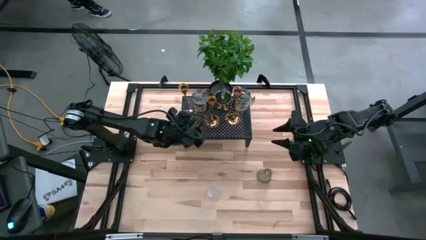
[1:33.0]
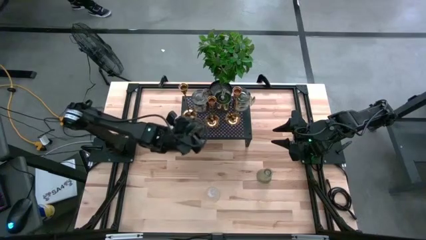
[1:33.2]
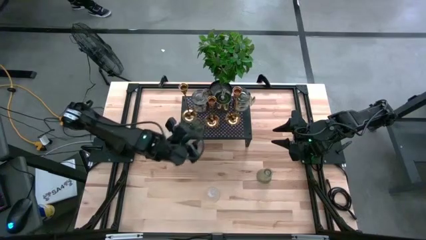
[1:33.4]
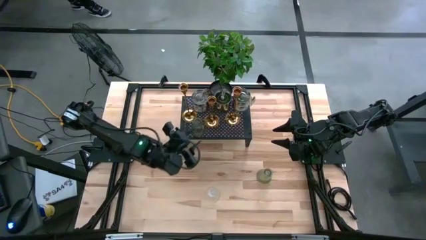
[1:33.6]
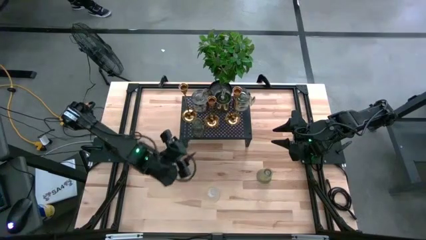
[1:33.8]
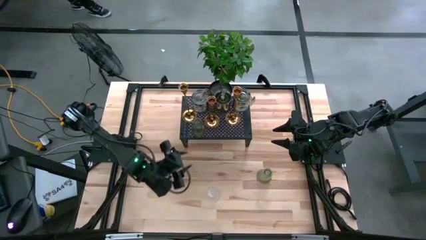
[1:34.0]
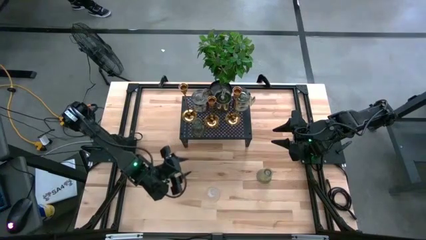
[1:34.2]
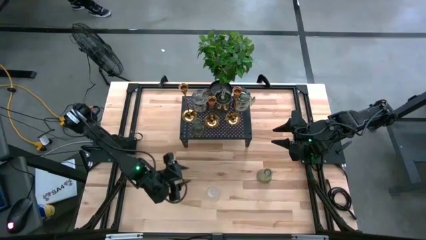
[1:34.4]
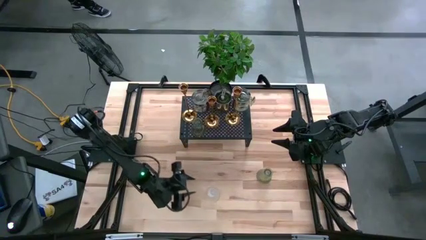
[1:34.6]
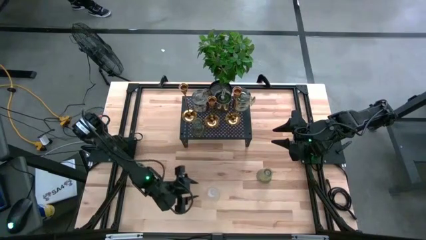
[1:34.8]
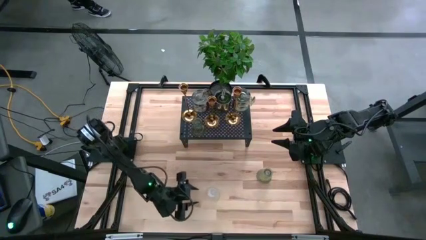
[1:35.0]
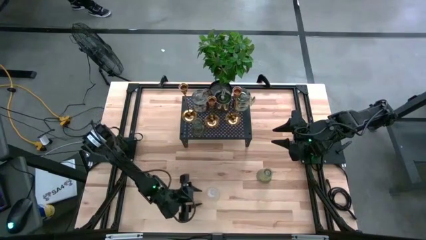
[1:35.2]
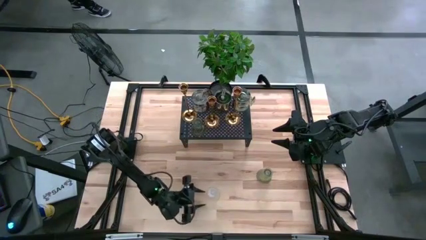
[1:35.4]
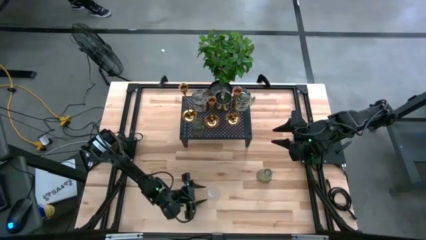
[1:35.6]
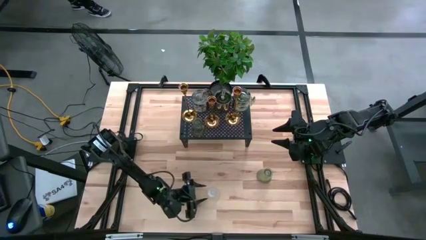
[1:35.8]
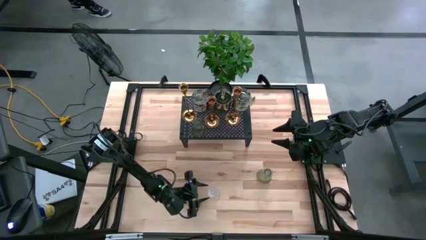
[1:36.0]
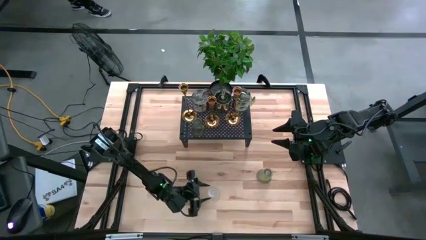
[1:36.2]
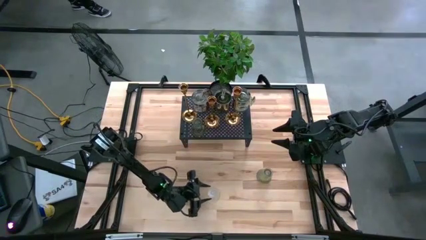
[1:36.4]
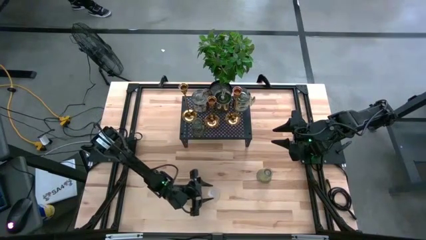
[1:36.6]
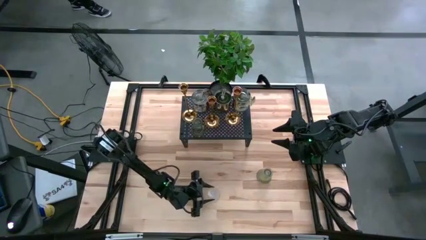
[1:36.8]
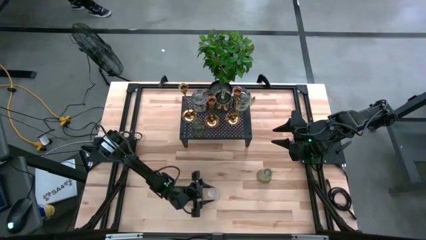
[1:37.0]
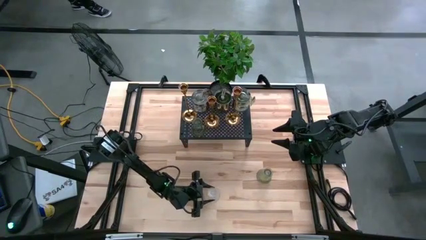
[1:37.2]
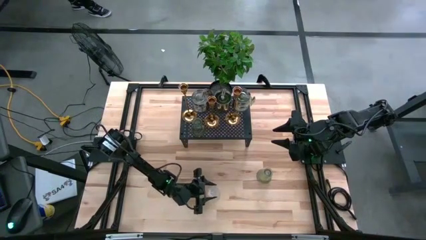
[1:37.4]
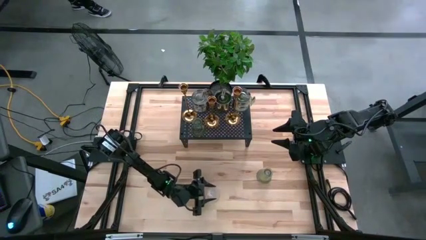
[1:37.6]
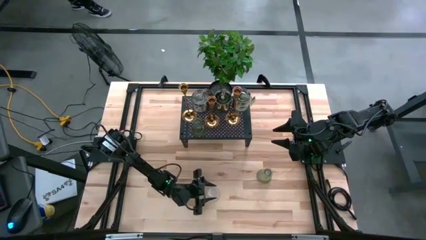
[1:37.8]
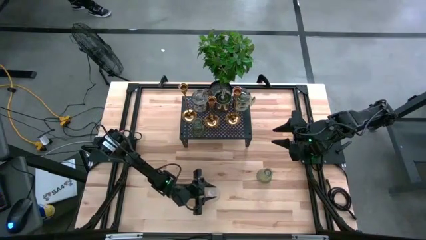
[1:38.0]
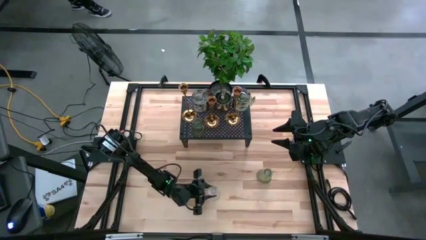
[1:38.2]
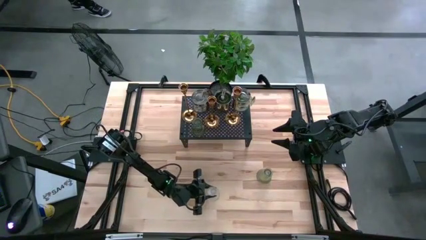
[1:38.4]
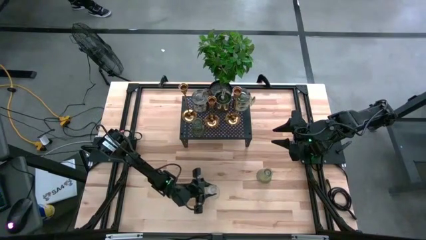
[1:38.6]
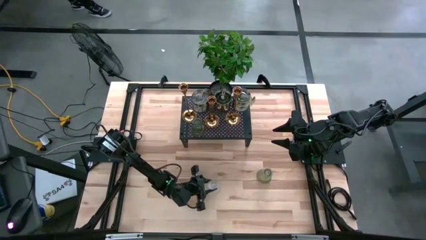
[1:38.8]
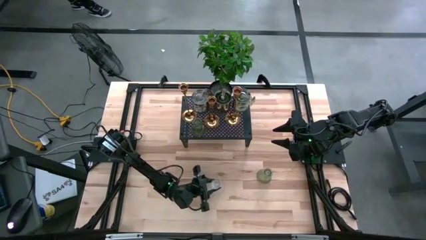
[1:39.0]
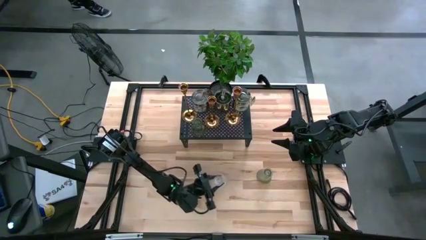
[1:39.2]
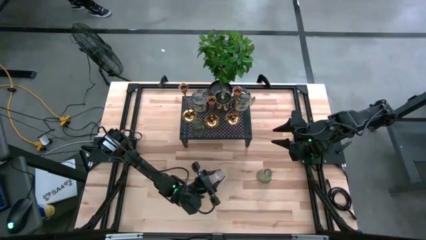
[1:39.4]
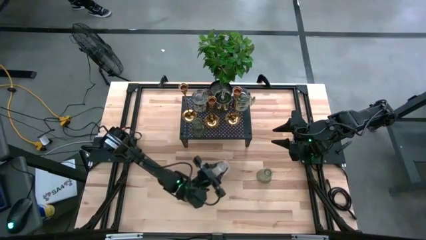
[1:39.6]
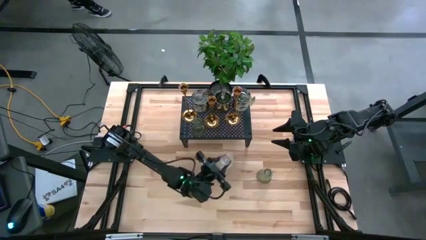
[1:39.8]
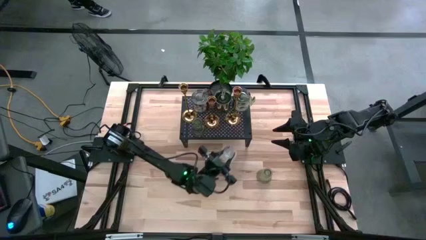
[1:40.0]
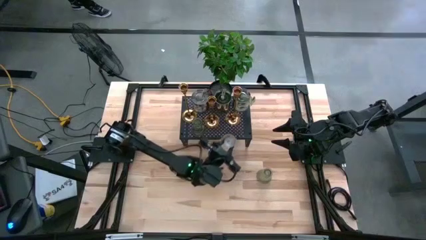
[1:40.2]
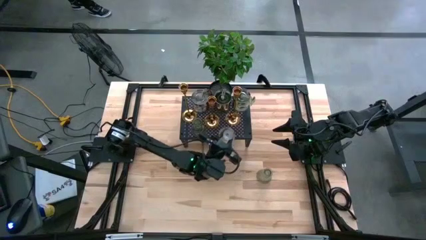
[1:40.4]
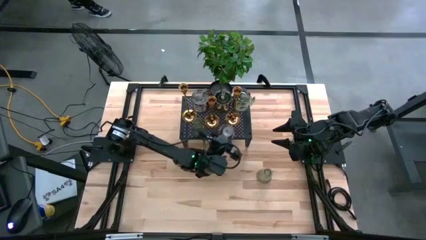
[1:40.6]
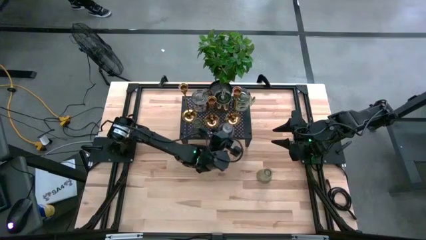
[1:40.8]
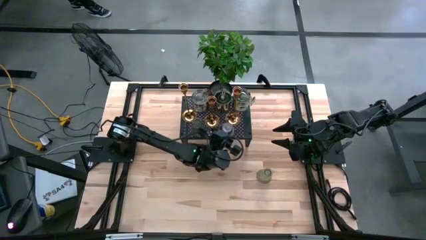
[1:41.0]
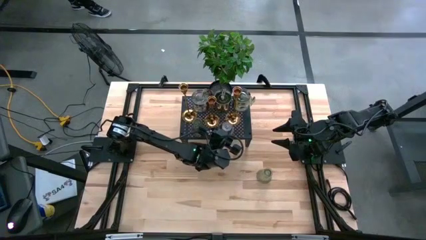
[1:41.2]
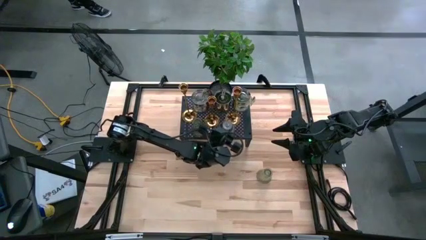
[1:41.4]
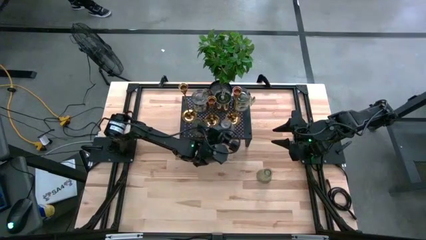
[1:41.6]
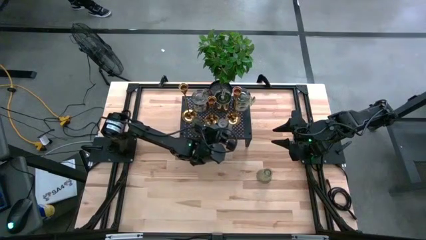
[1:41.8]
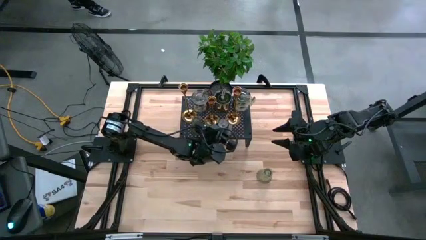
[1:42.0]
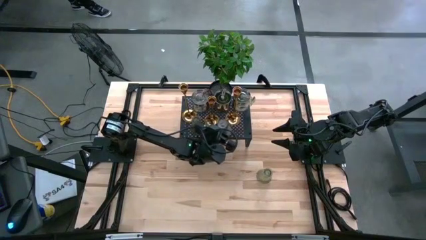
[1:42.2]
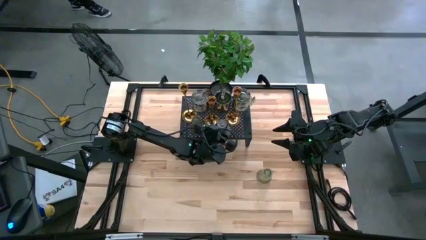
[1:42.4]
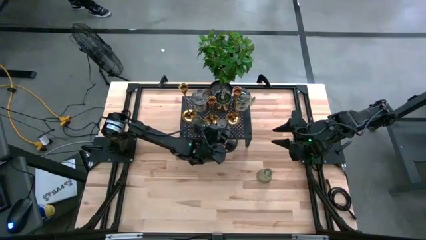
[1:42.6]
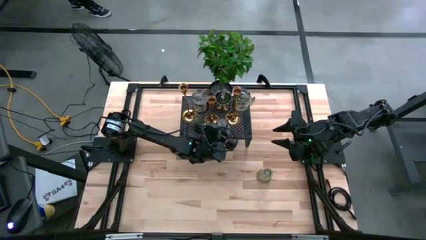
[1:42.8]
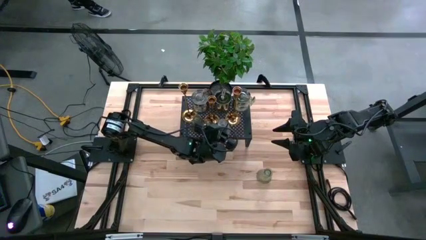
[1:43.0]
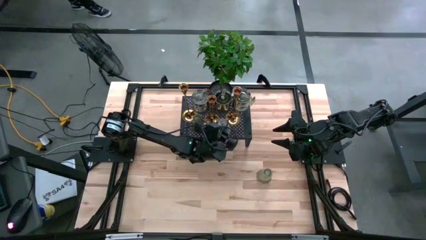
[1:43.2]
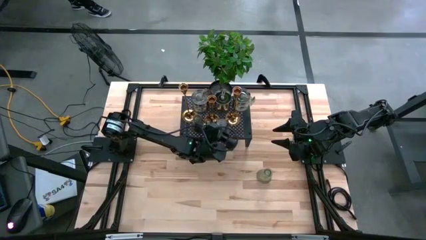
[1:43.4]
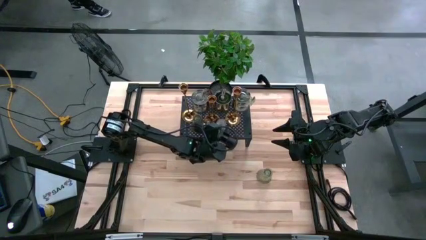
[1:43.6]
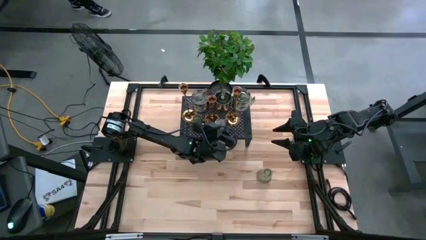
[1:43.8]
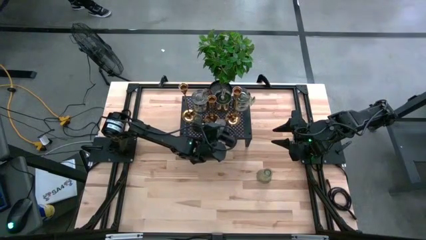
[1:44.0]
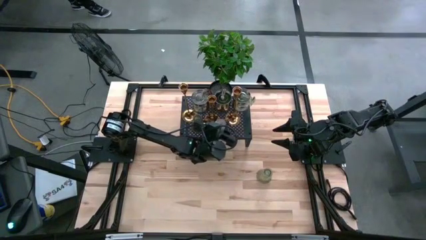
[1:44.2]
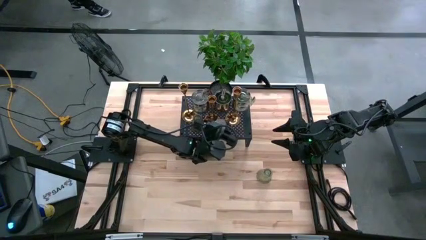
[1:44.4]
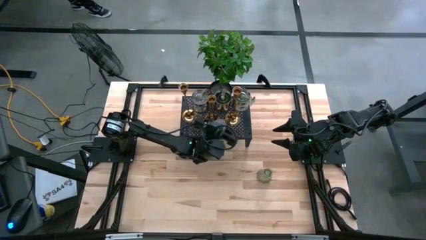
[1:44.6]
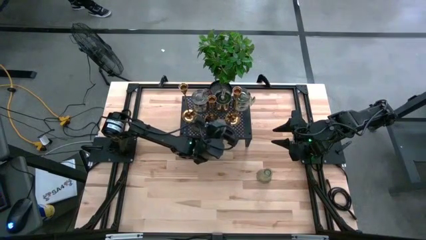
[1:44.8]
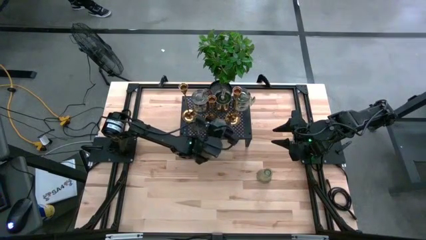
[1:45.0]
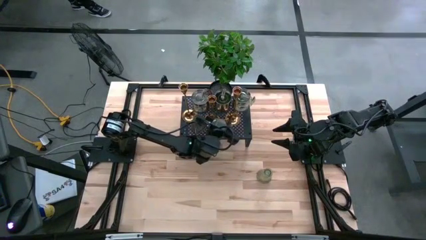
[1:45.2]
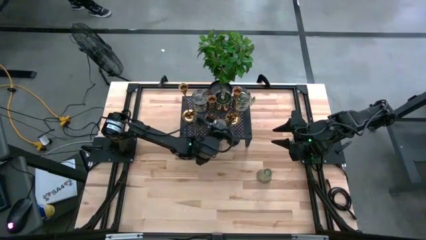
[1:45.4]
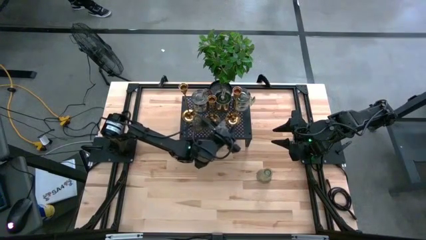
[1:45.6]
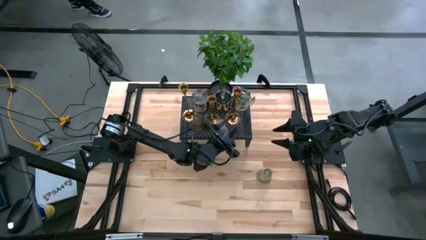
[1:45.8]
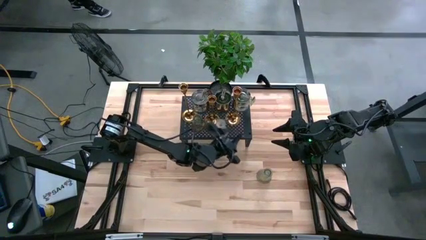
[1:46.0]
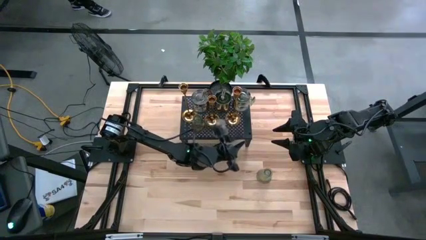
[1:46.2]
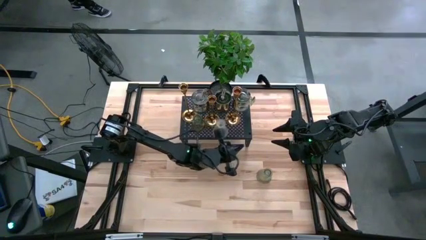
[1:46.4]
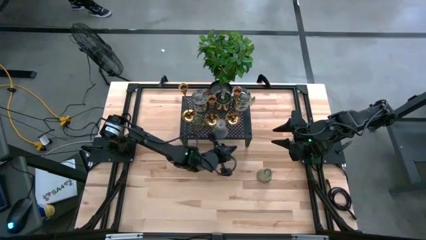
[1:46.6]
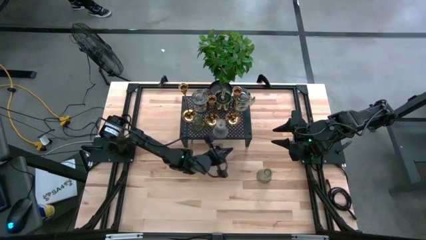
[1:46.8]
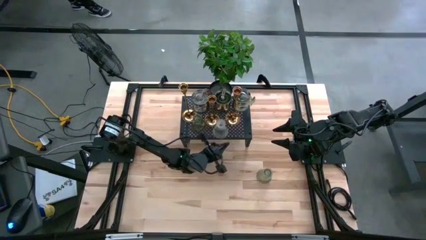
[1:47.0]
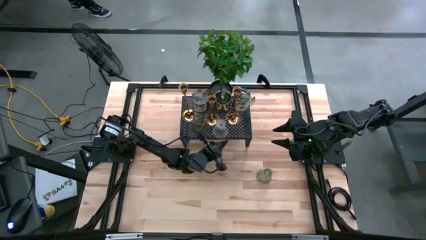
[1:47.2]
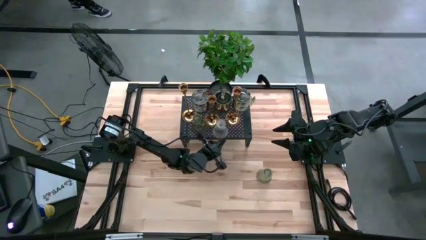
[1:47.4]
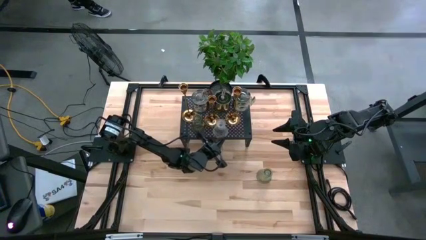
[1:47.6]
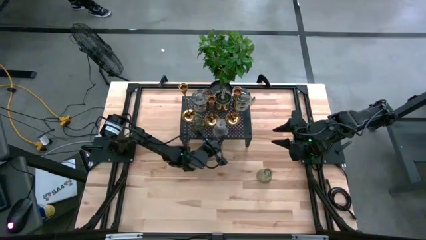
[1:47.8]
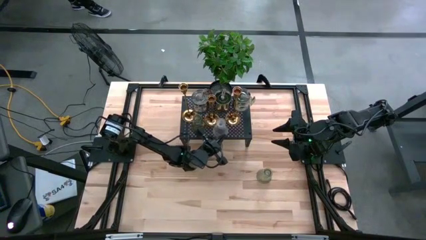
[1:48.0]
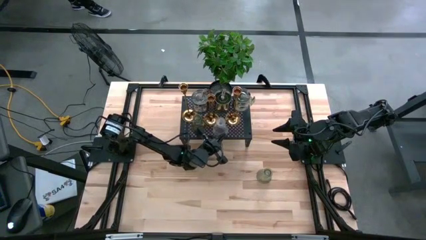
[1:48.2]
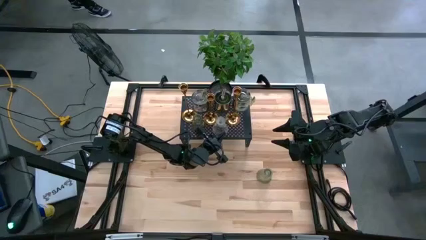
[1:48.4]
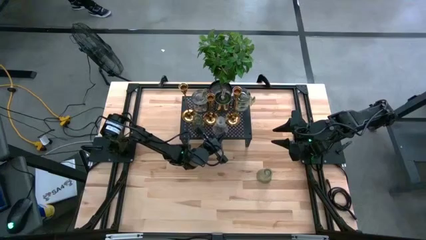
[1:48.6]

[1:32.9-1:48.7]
Task: Pick & Place candle stick holders
Put the transparent candle holder on the shelf aligned with the green candle holder
